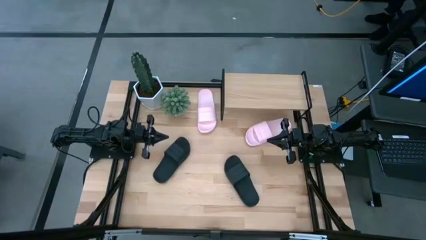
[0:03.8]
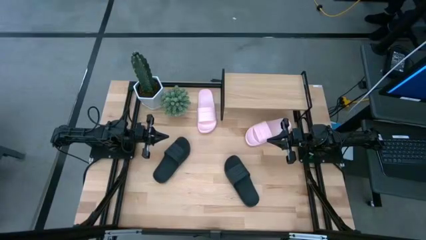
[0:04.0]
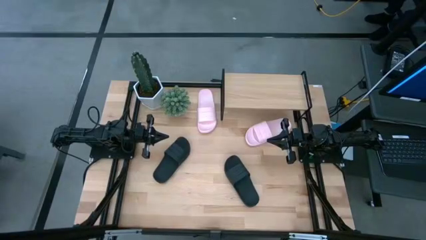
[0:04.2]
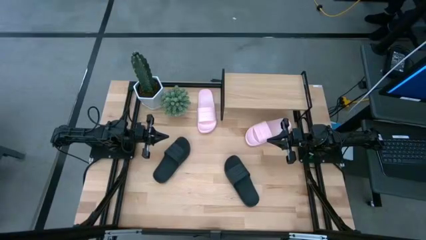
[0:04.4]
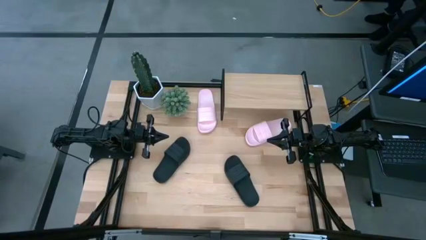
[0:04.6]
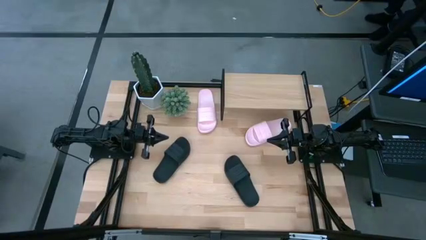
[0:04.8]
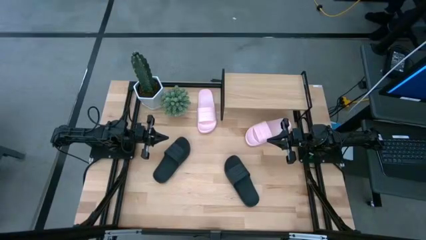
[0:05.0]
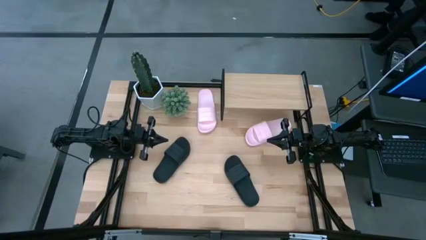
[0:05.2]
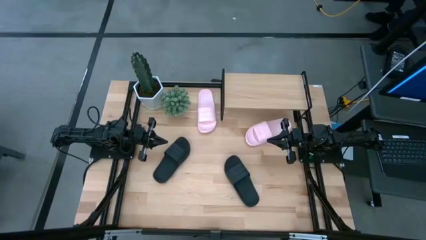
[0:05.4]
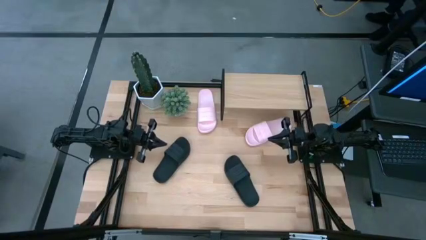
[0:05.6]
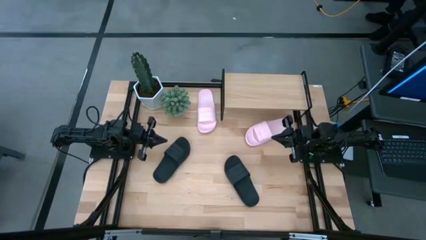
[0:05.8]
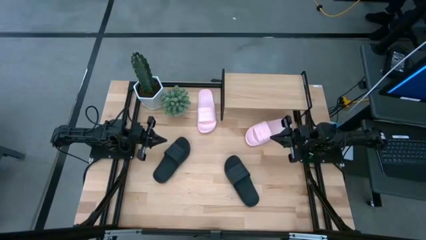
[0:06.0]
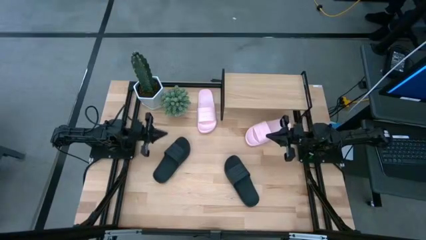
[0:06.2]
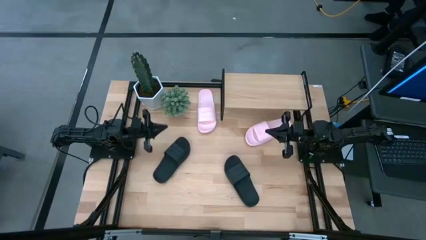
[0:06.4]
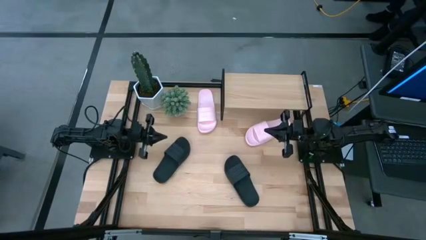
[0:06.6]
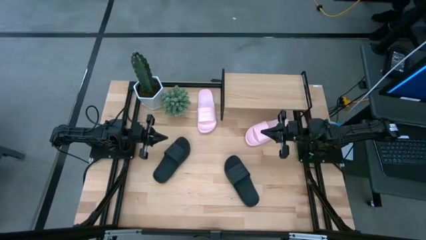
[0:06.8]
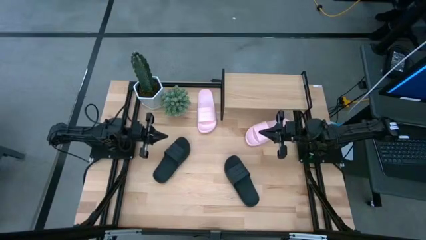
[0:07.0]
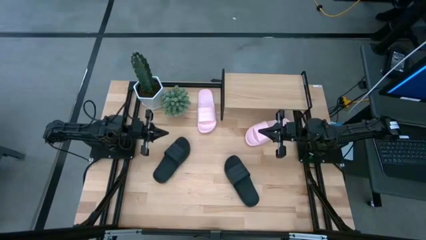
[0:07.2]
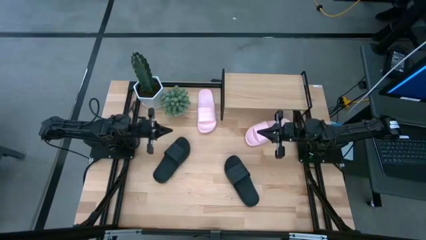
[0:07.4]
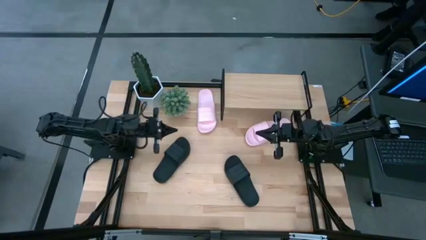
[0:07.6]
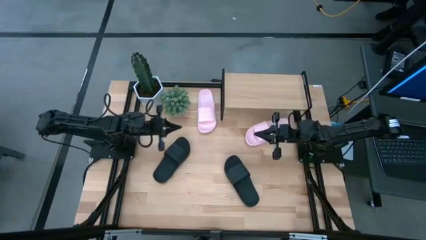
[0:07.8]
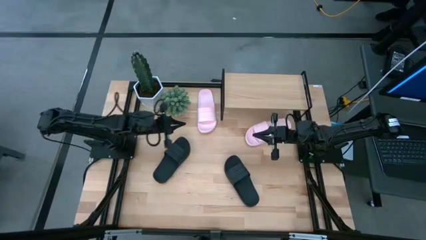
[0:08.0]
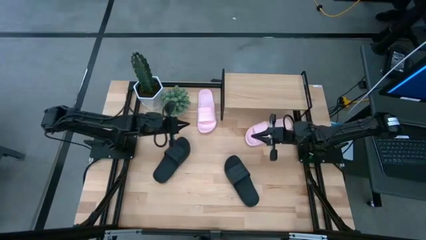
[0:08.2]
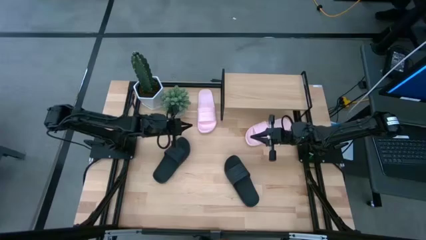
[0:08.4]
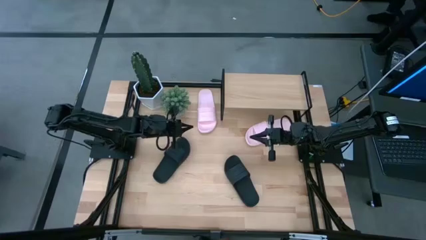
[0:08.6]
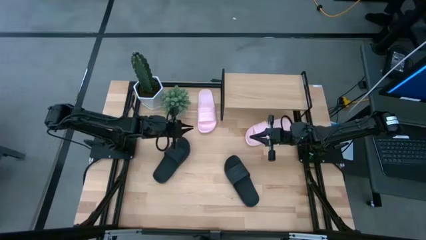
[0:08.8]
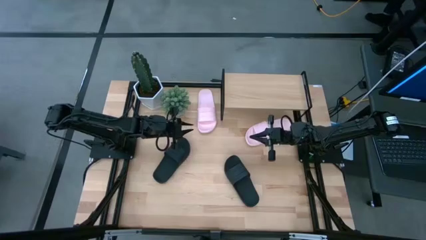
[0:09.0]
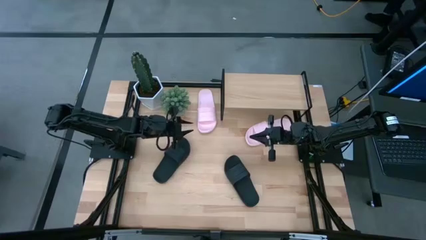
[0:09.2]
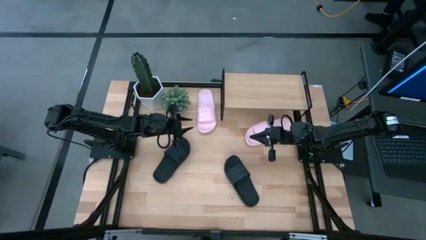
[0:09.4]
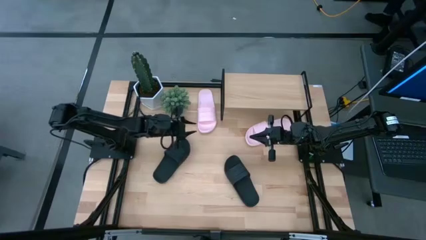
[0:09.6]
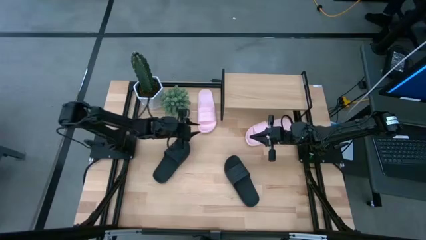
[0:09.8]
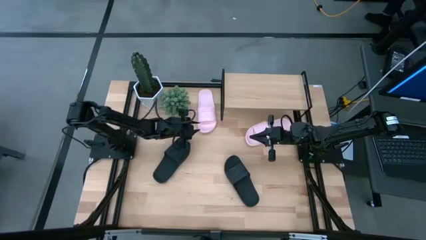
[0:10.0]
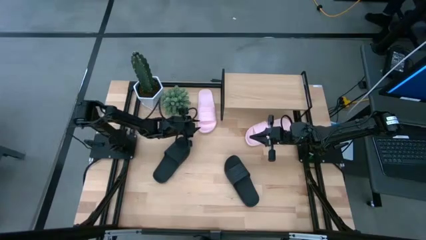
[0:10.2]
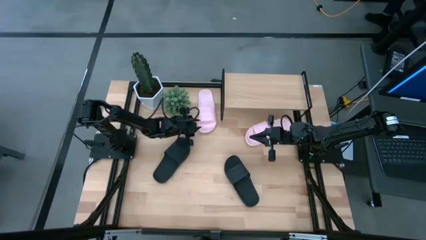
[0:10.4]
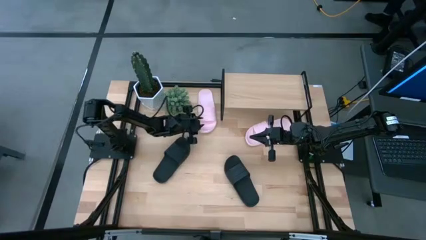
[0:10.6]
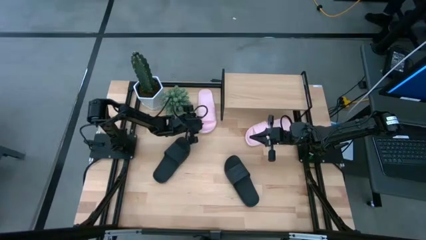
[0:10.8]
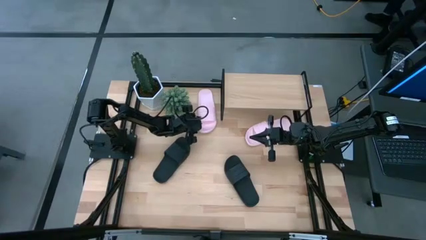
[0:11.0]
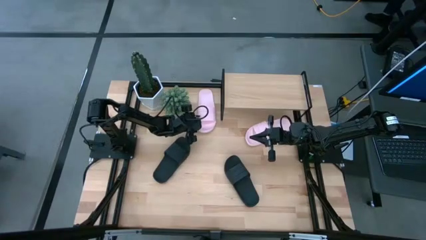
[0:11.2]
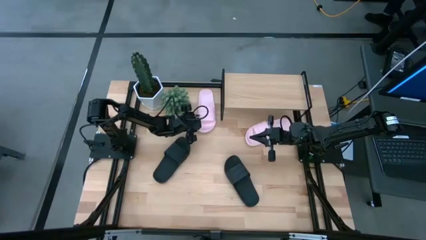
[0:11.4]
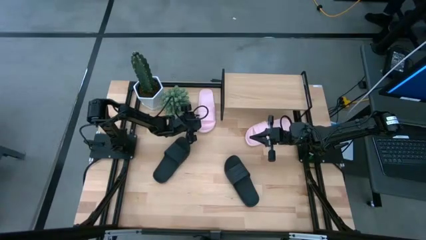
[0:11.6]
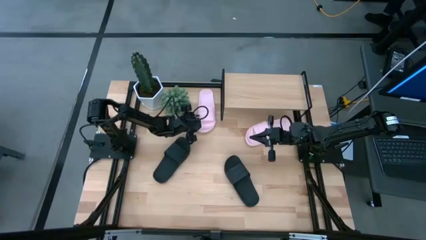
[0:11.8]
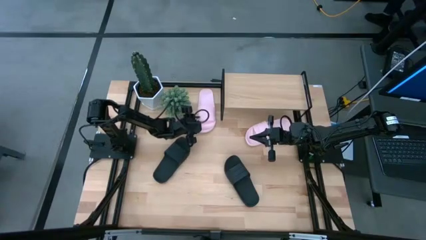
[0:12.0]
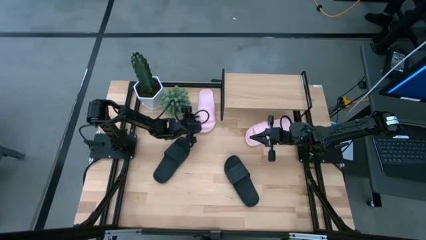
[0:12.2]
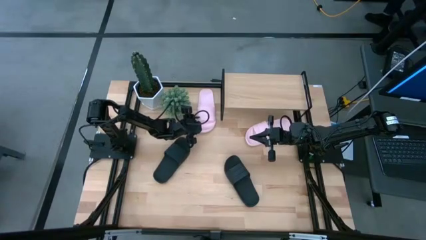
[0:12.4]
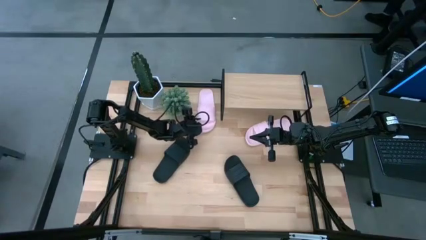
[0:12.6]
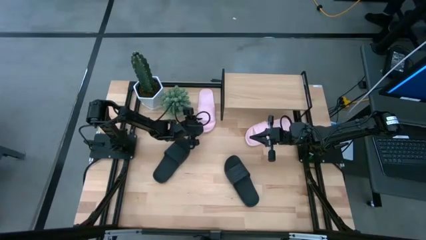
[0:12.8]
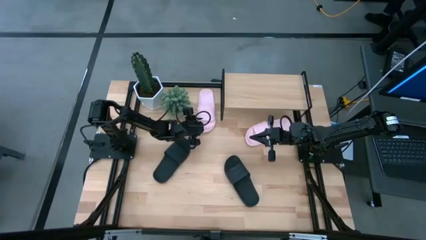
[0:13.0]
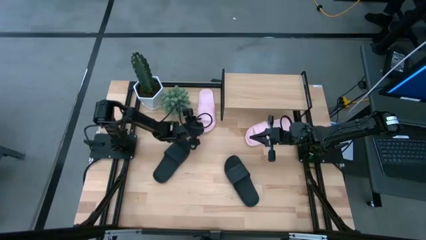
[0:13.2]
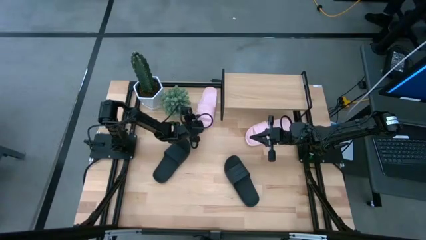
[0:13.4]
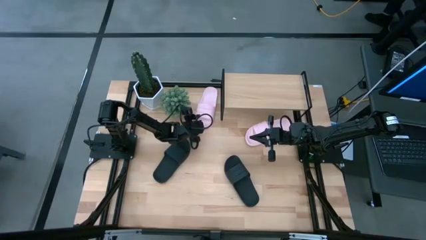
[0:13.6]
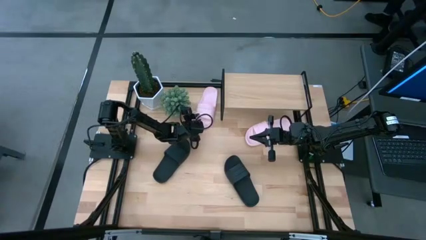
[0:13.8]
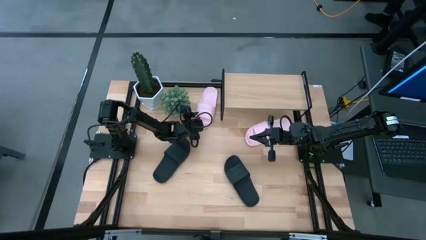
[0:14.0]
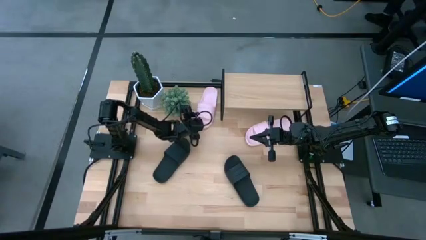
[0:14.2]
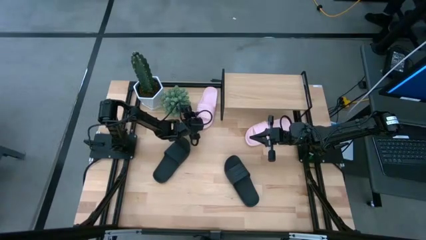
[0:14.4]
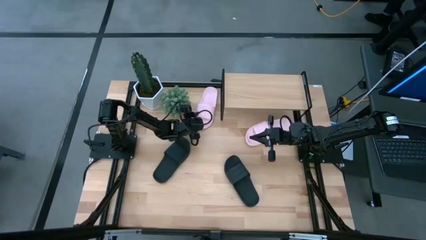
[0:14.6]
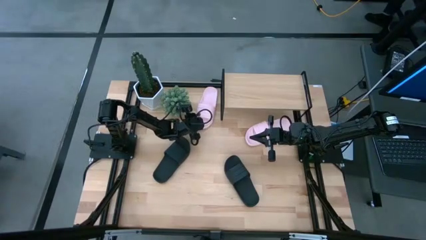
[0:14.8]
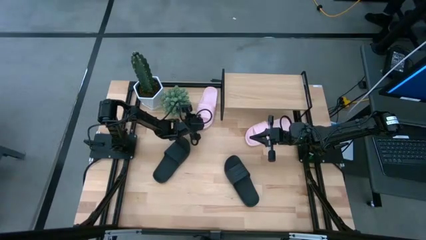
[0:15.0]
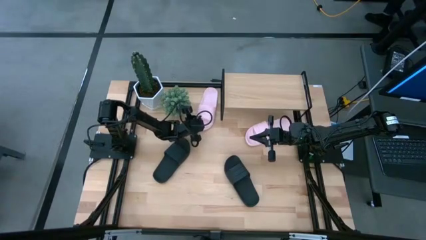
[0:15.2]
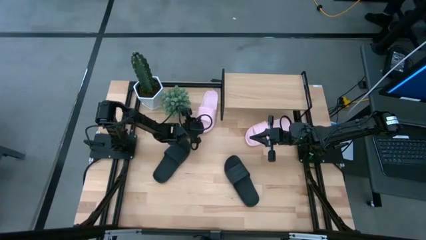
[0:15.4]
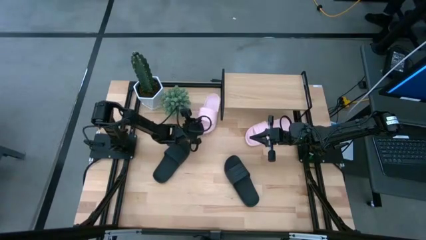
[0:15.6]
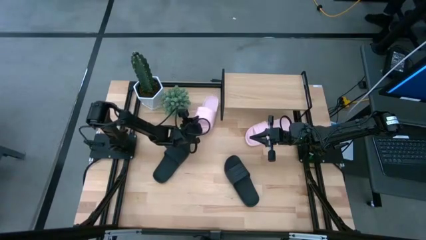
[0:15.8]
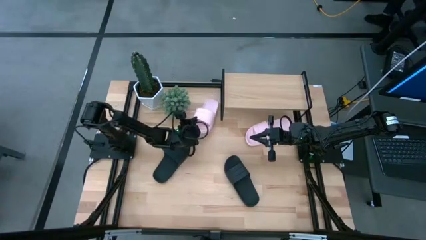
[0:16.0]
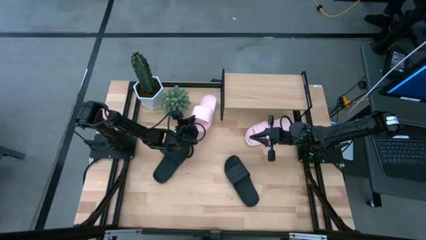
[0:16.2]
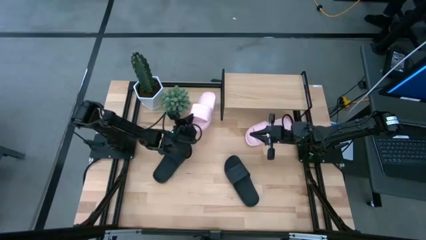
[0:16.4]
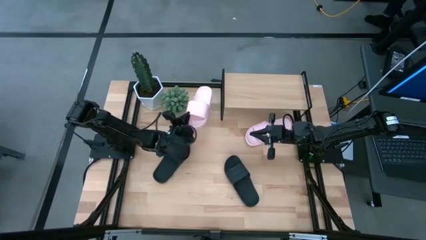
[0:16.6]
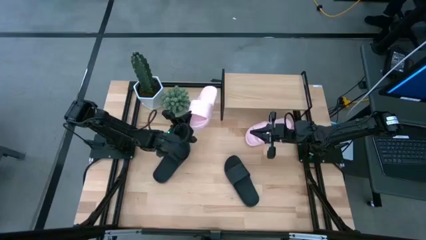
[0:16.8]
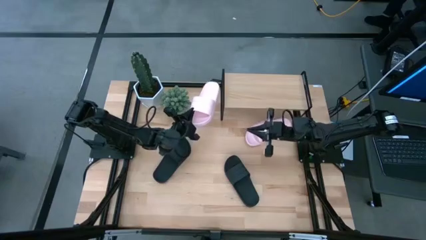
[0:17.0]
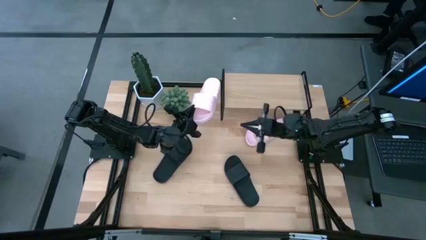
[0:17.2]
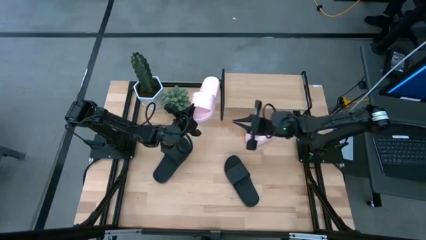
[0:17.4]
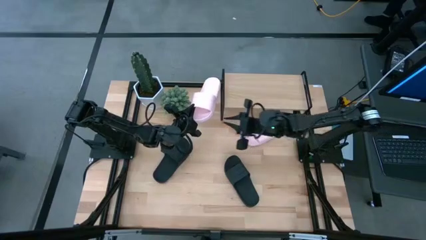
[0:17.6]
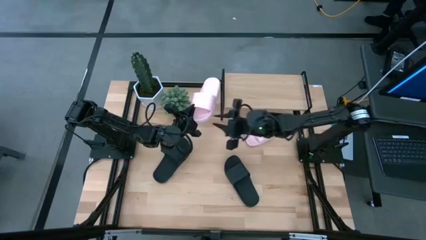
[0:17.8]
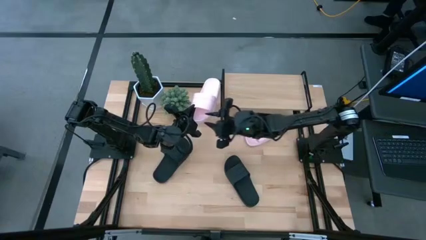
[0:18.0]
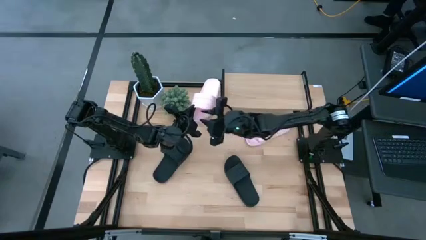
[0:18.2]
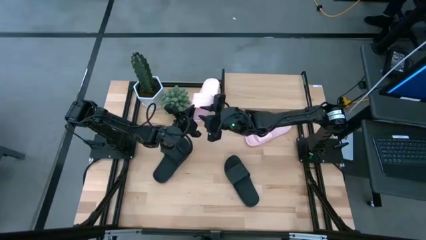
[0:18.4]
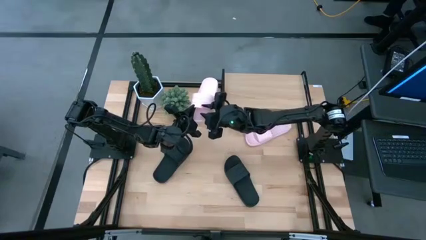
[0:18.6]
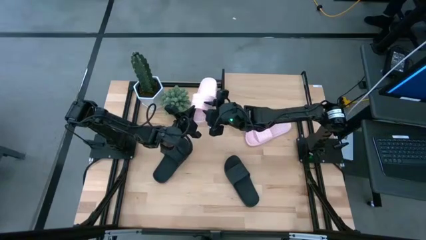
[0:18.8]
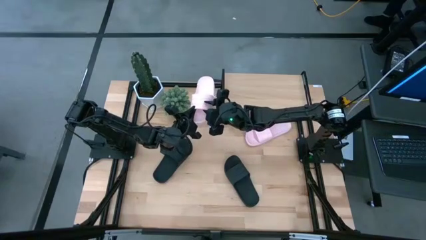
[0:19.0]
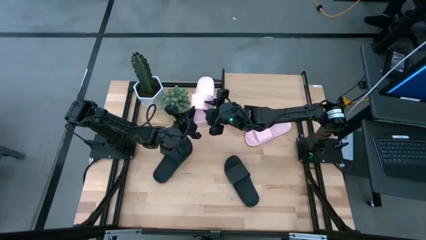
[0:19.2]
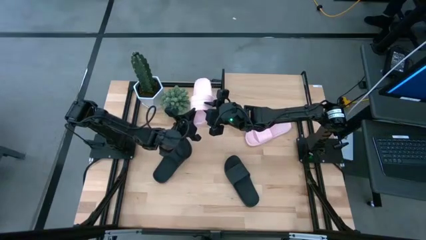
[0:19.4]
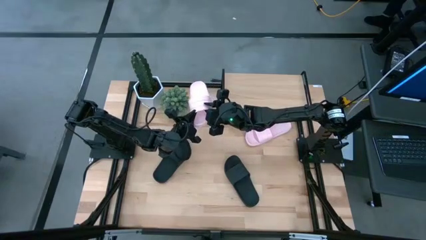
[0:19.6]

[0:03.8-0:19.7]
Task: Pick and place slides into the shelf
Put the left pink slides on the shelf
